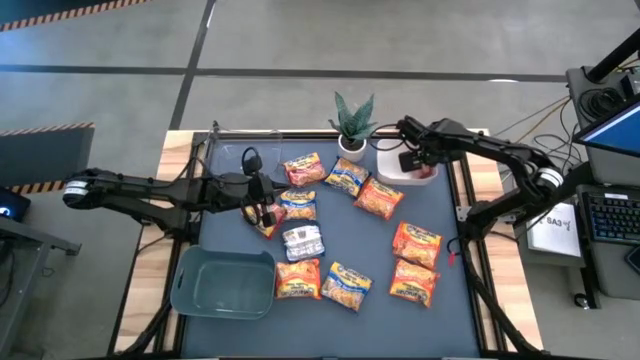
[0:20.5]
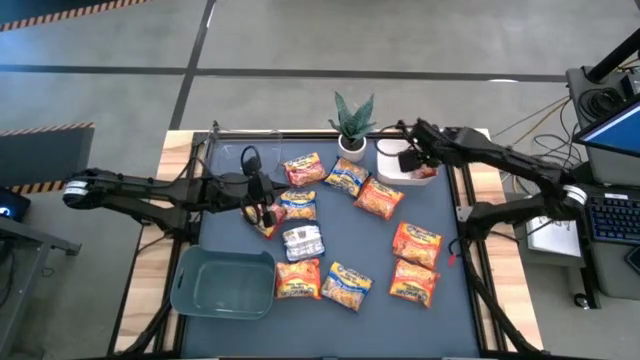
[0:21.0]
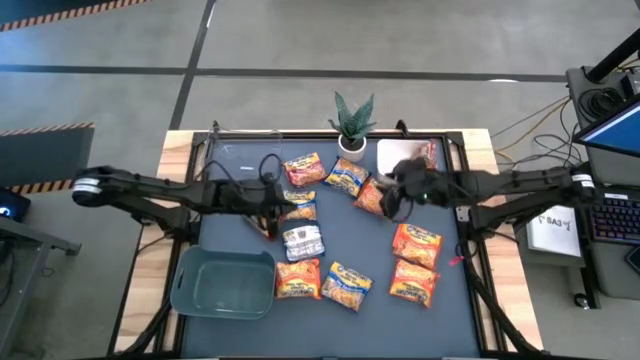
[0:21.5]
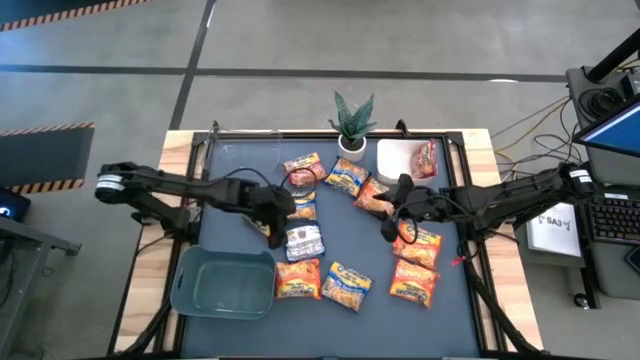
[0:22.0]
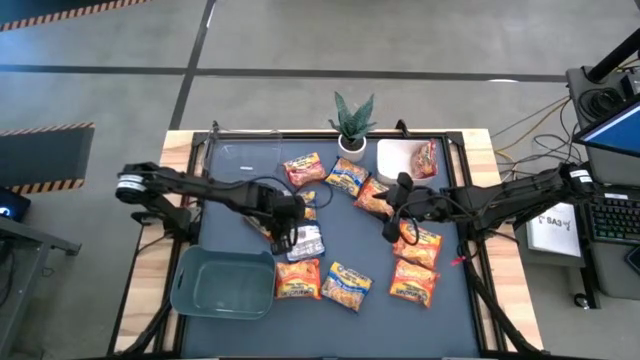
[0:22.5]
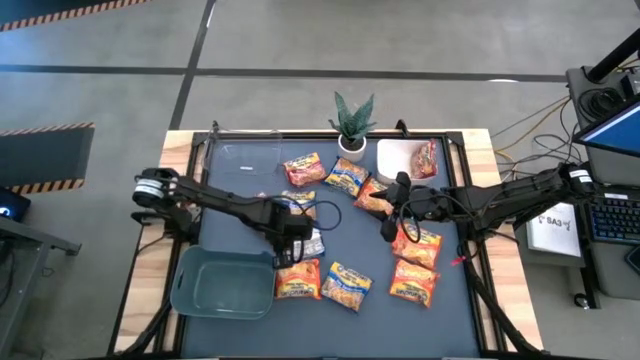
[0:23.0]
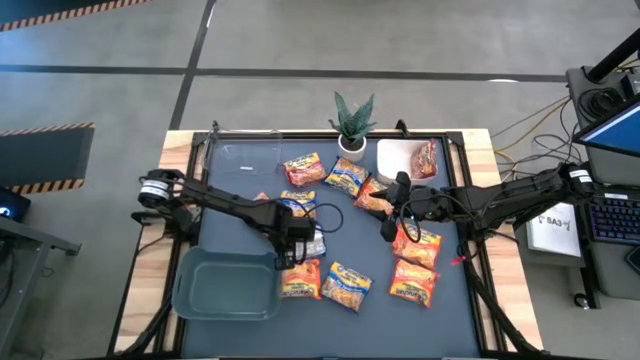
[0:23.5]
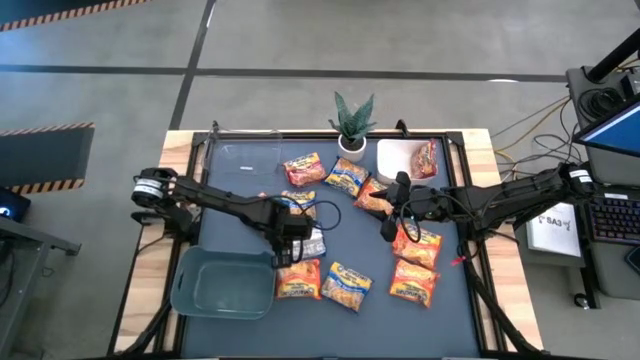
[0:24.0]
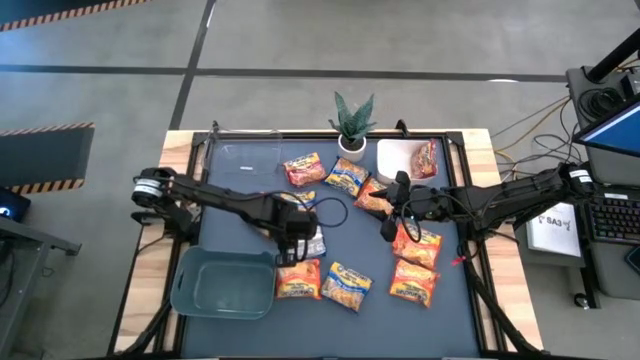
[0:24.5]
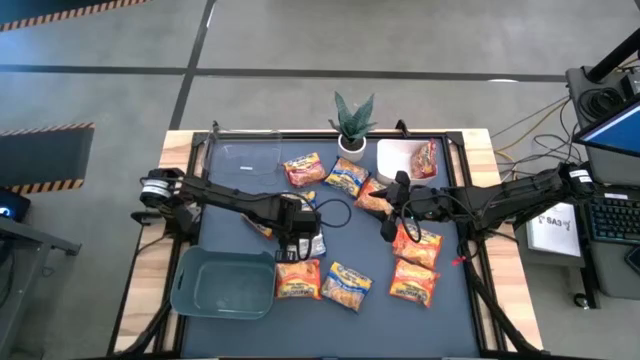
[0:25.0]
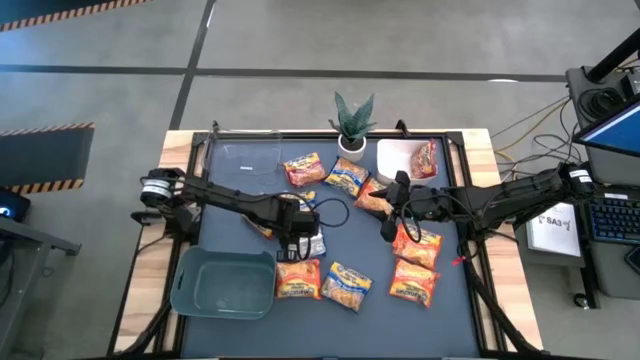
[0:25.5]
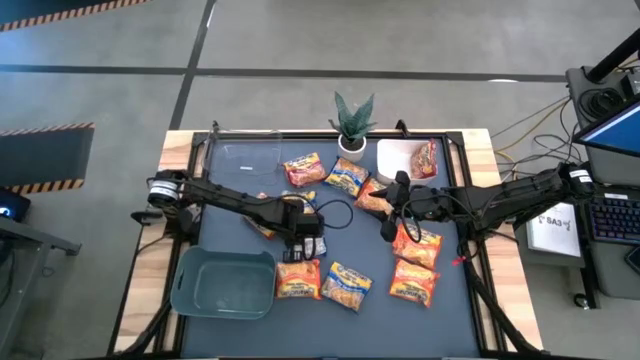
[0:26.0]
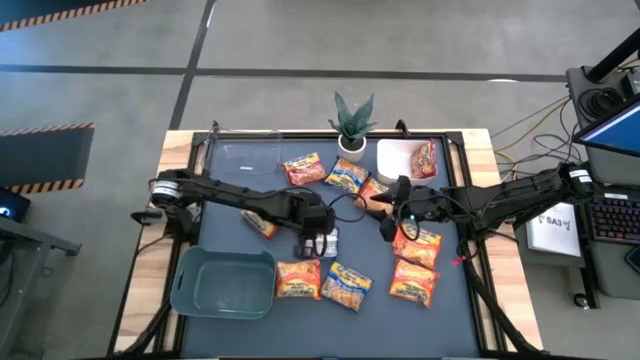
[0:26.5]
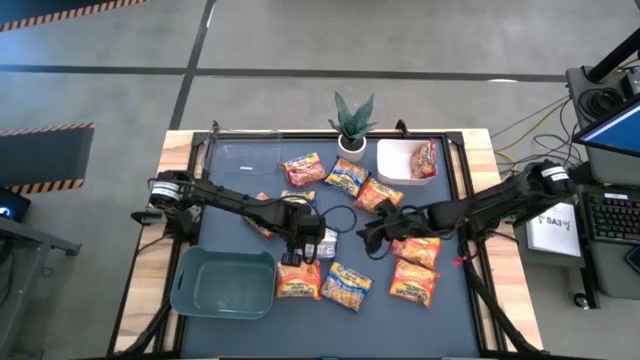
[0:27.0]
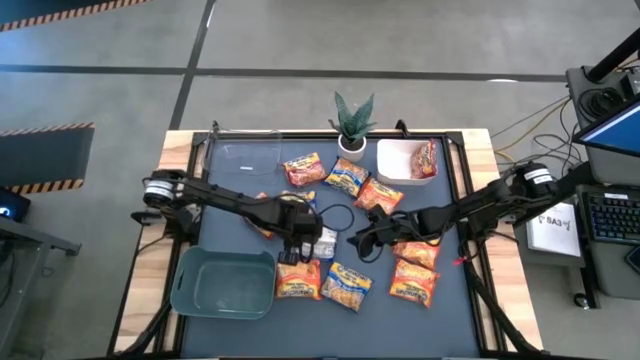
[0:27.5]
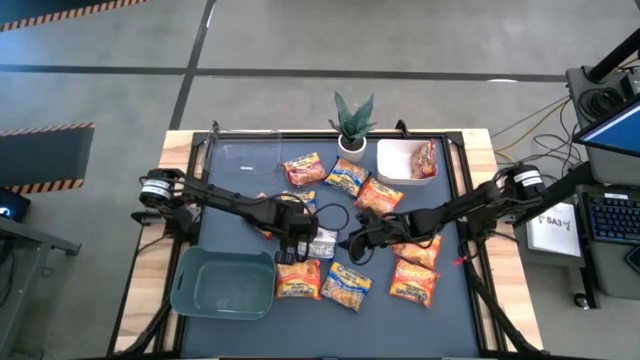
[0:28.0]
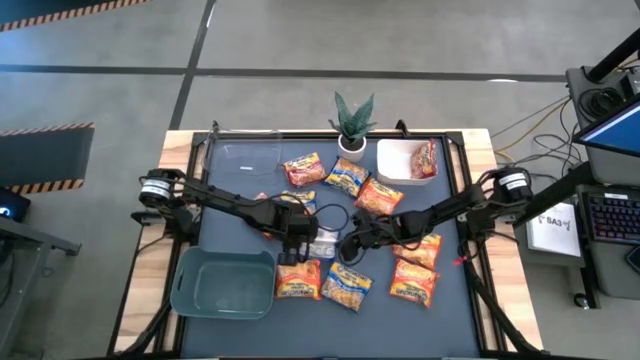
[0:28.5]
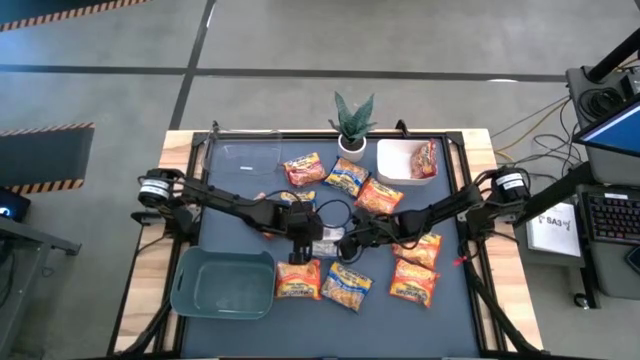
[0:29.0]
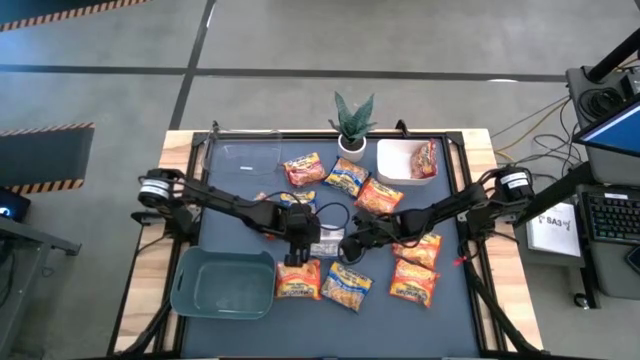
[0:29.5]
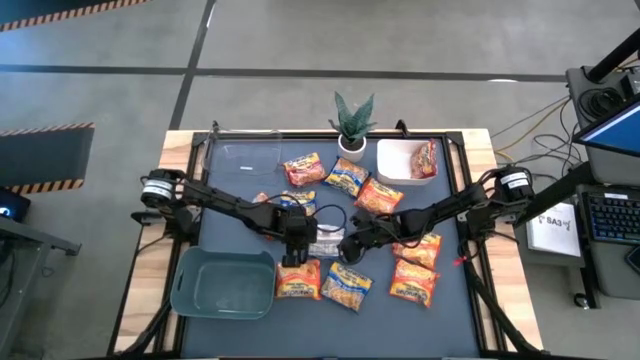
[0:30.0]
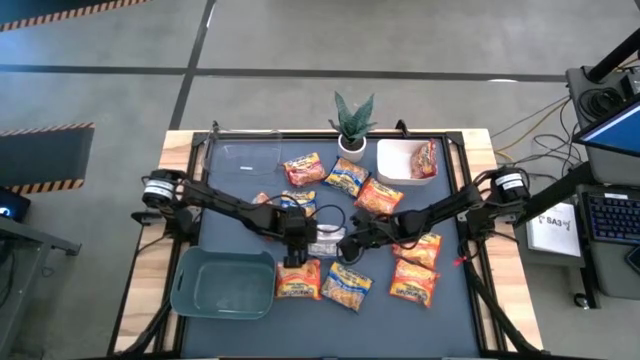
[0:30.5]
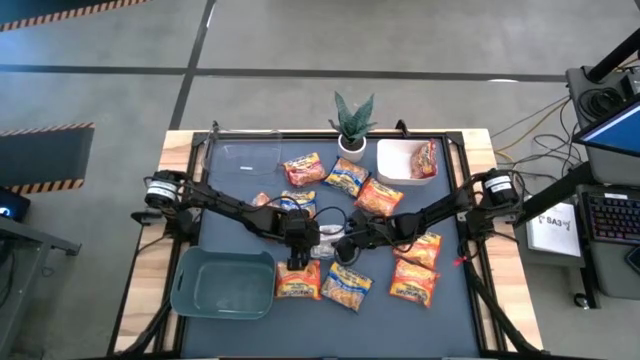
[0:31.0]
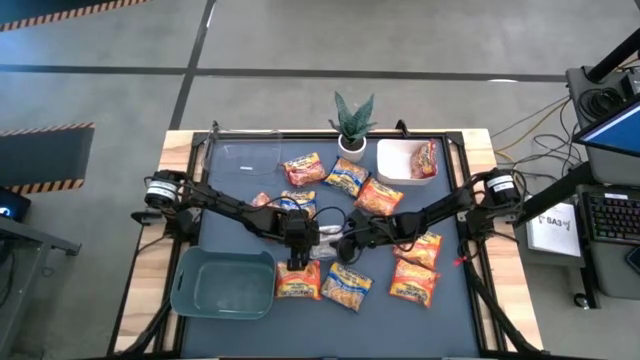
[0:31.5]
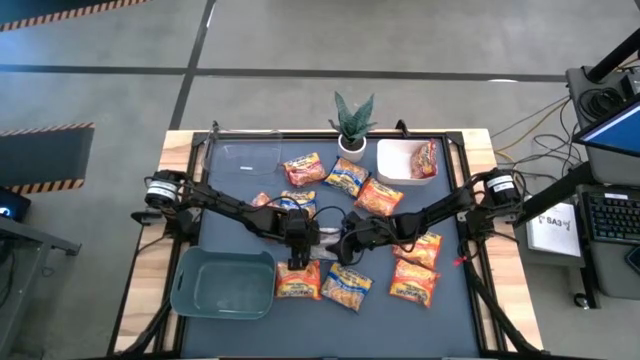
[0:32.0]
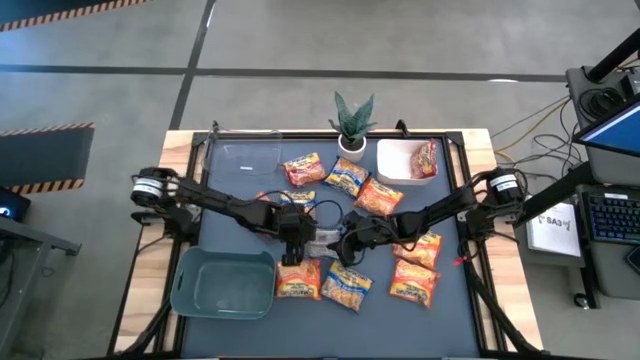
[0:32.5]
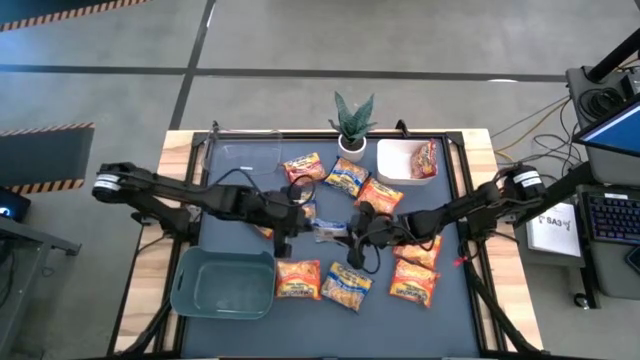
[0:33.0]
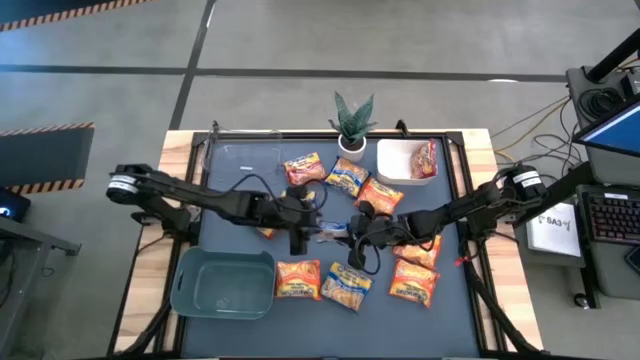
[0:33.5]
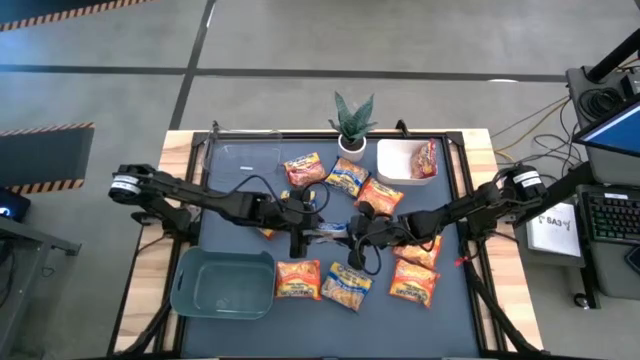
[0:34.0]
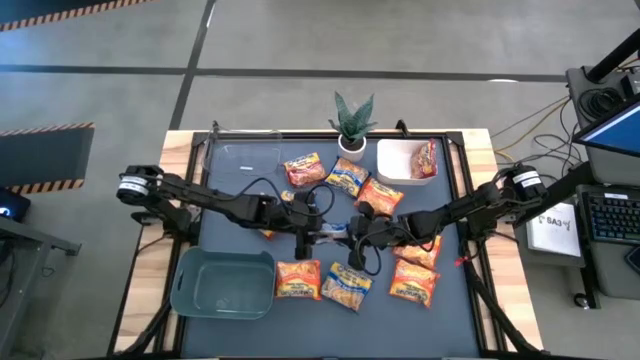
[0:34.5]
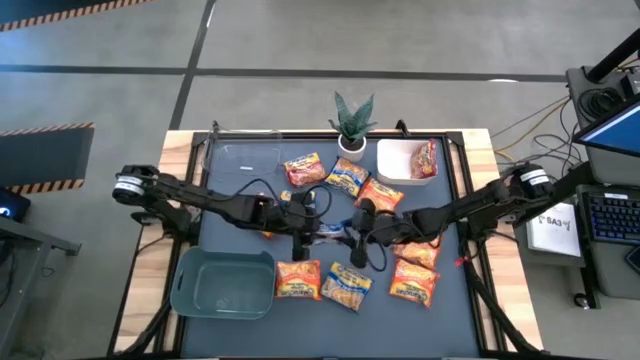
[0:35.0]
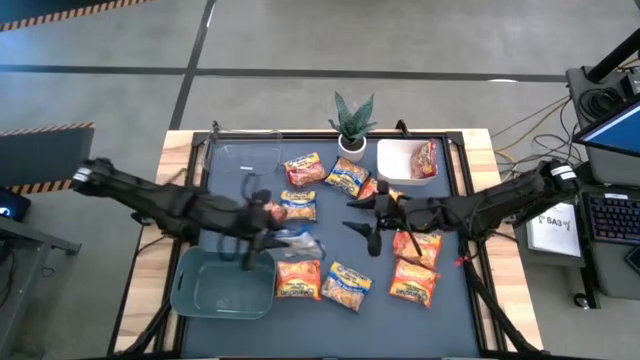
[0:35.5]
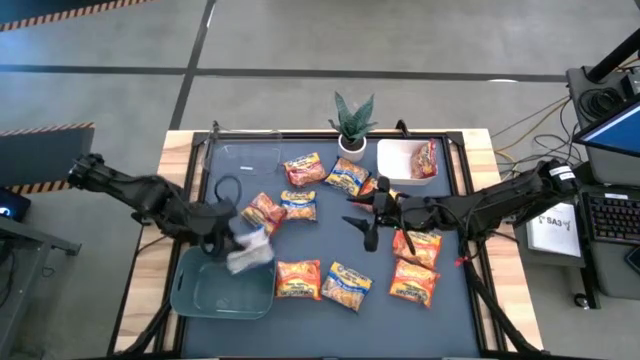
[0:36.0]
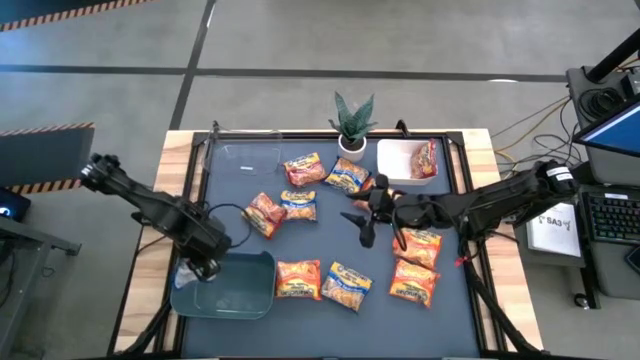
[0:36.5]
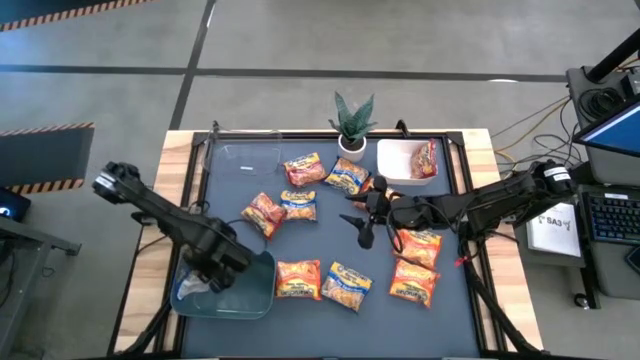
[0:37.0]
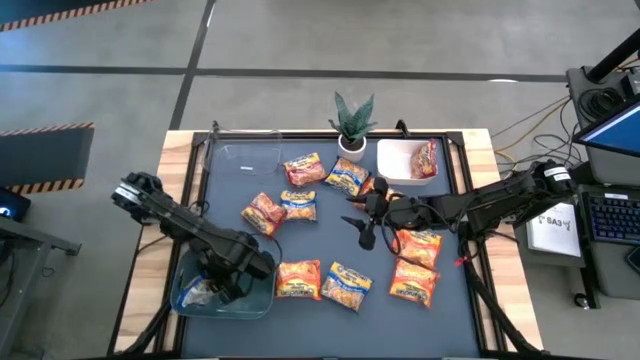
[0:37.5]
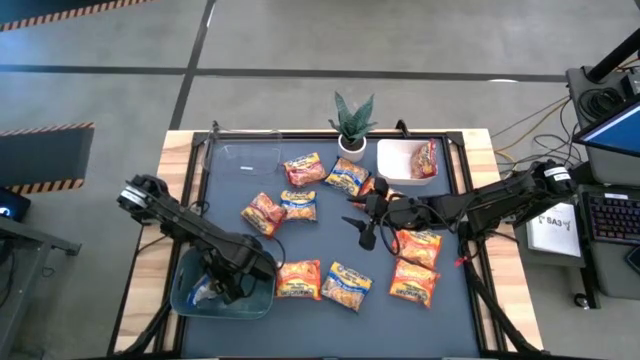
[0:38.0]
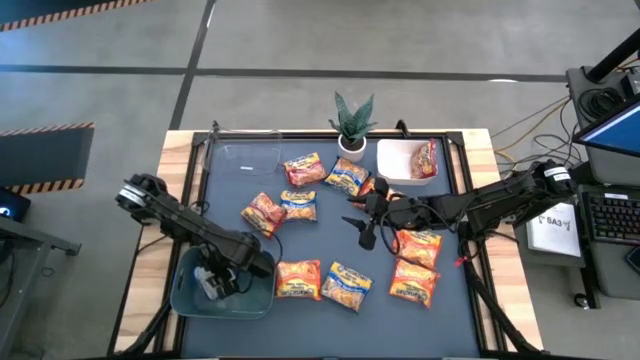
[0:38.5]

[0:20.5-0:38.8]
Task: Sort Maruchan noodles
Put the blue noodle pack into the blue bin

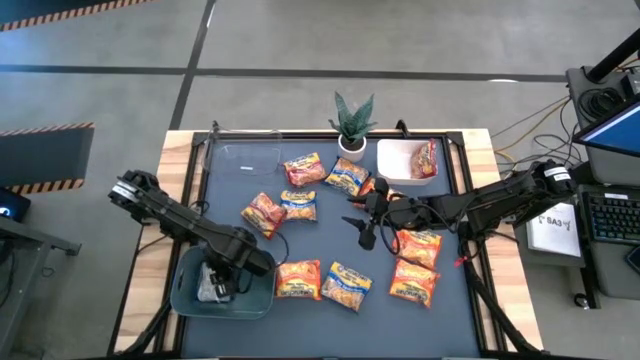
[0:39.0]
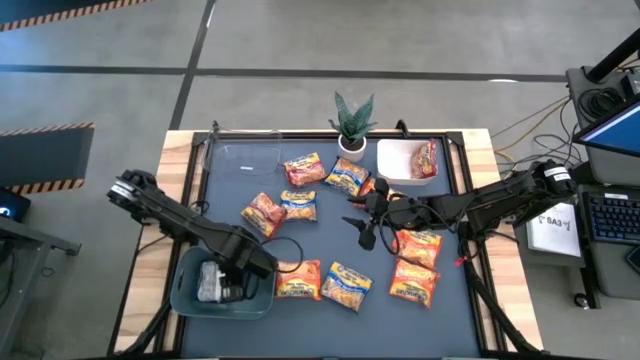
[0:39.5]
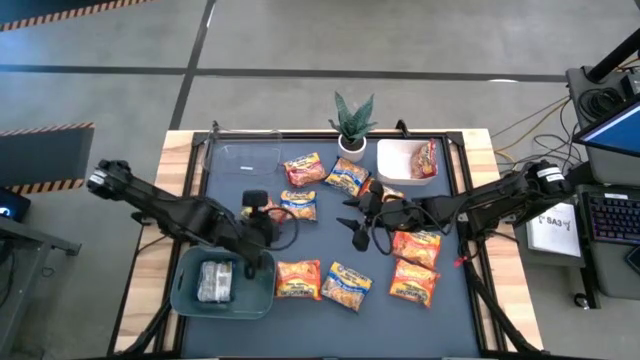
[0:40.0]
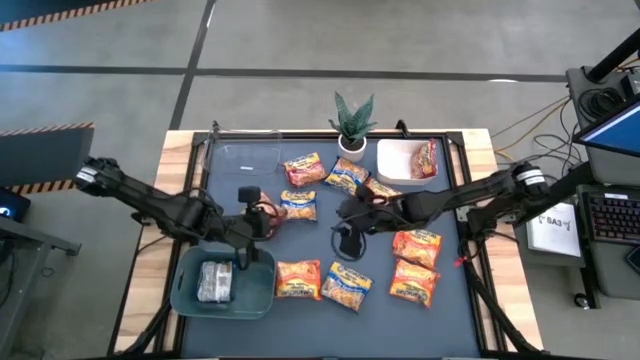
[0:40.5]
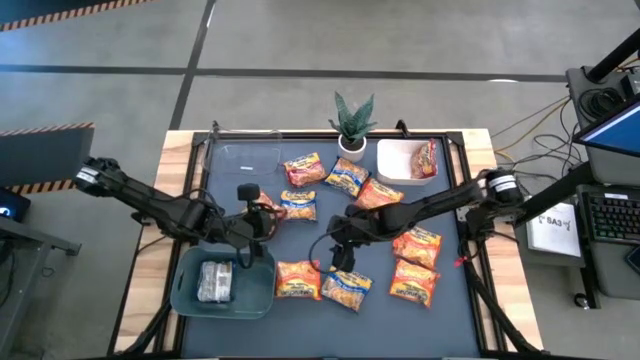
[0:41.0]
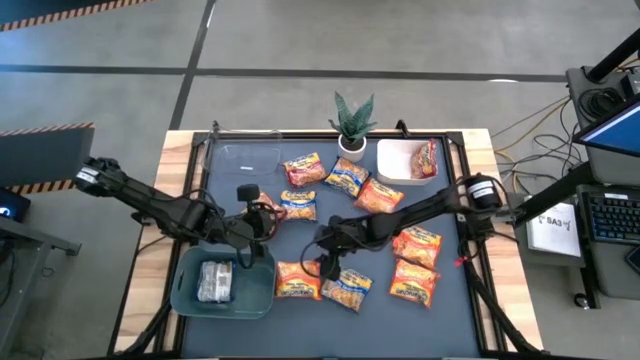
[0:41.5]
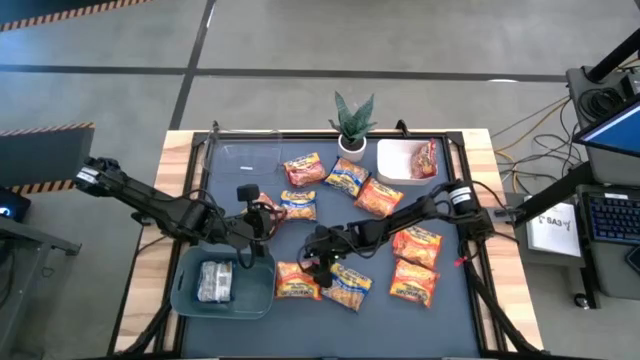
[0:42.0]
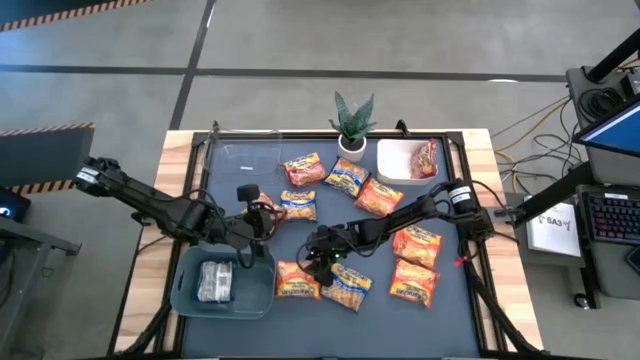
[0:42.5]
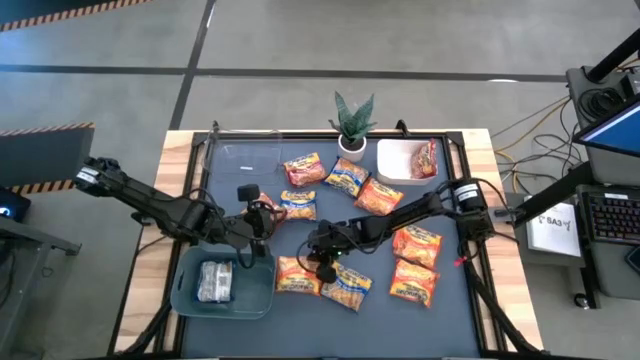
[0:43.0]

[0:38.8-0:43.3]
Adjust the orange noodle pack

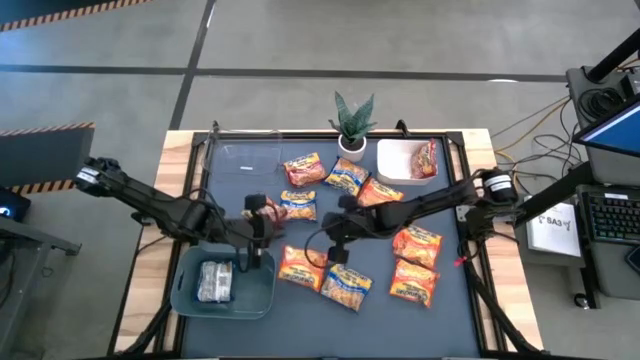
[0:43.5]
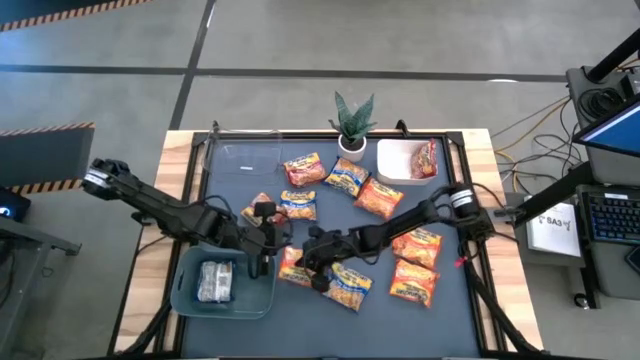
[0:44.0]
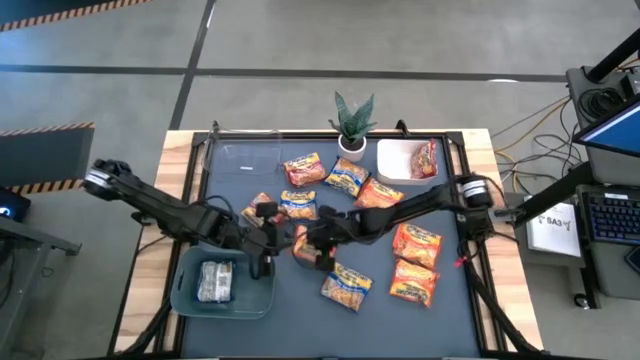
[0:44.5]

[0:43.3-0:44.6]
Adjust the orange noodle pack
